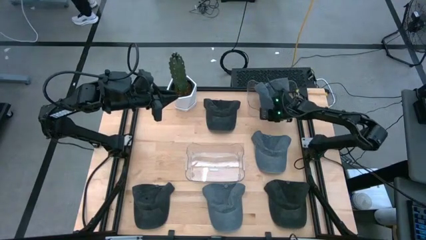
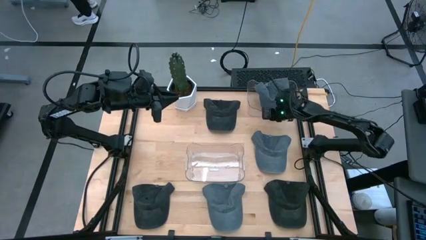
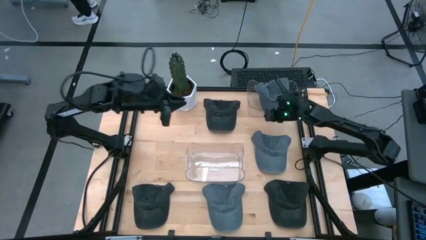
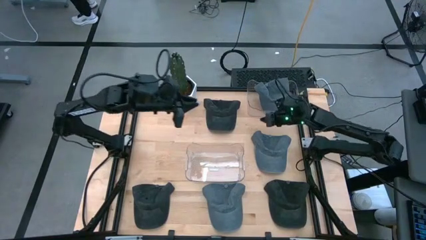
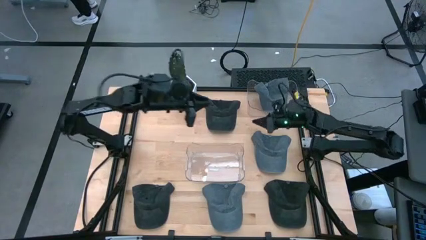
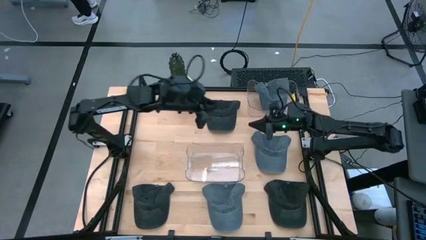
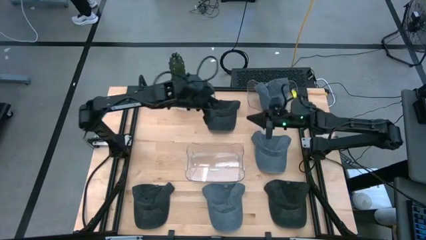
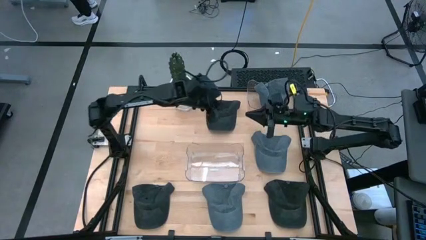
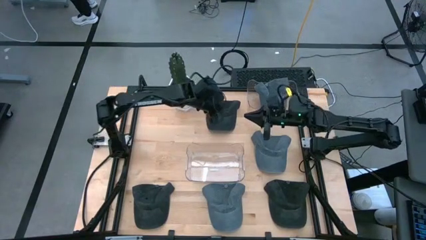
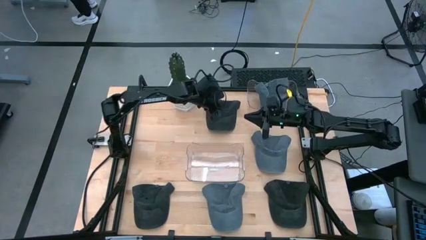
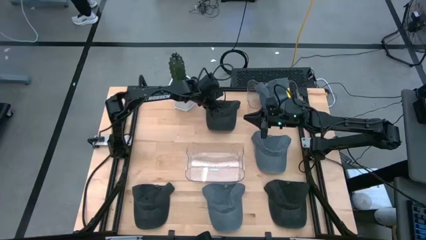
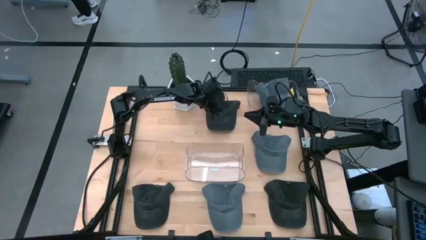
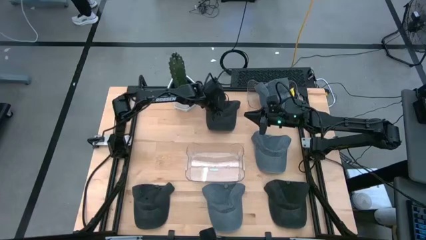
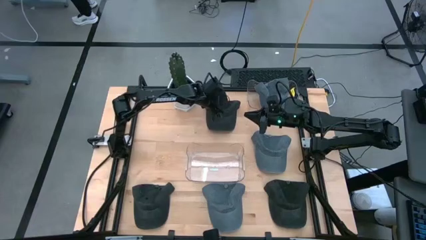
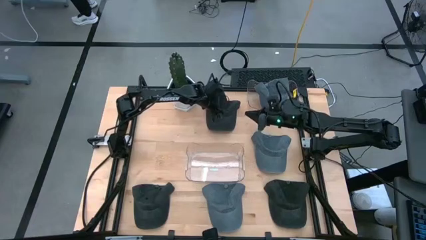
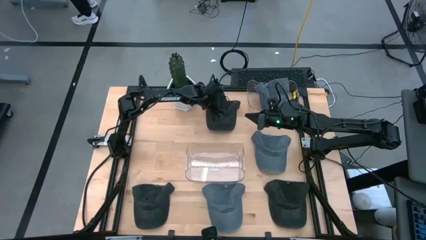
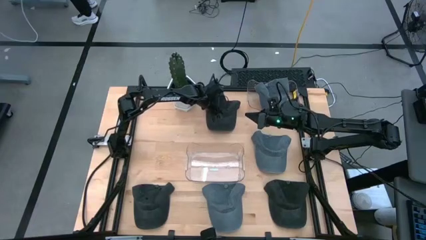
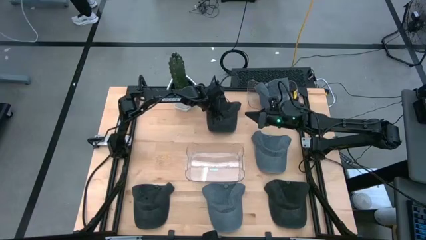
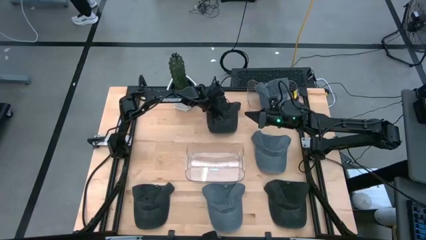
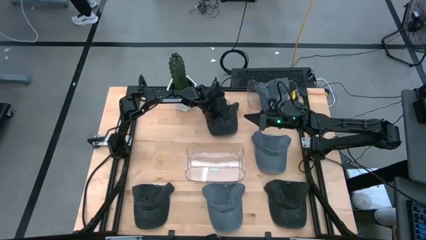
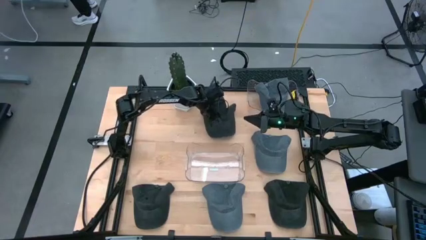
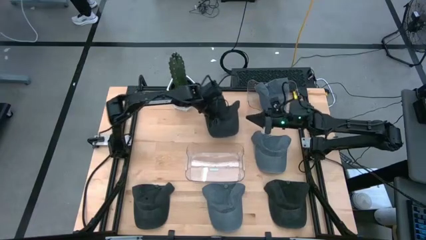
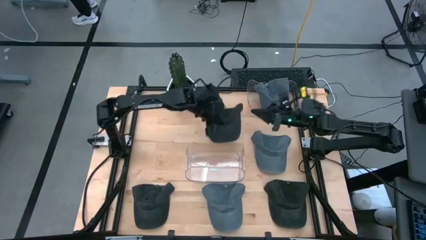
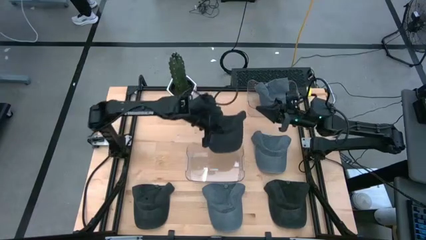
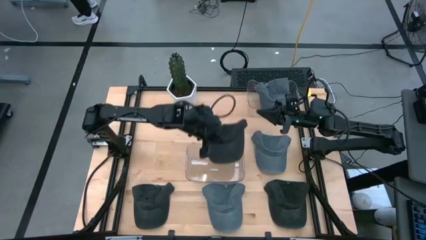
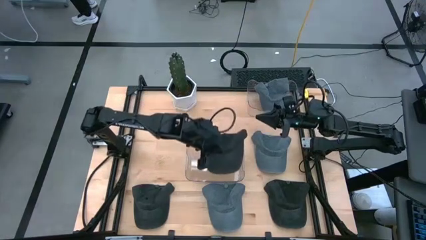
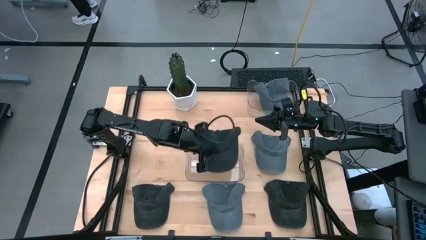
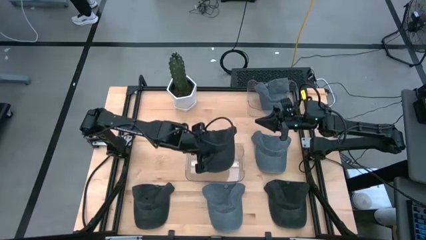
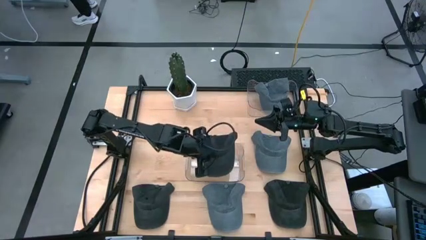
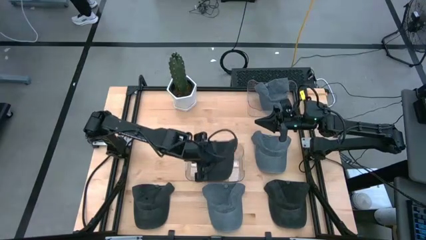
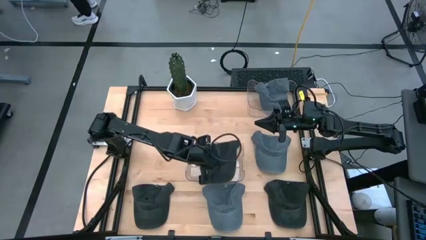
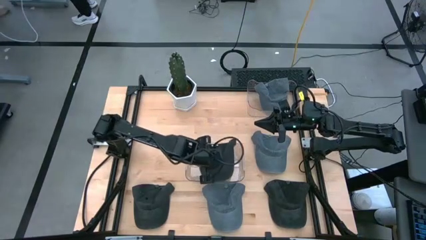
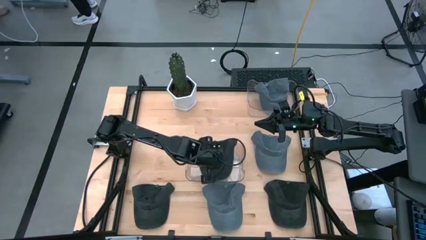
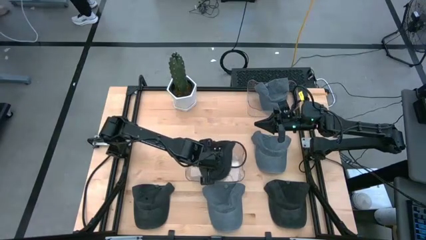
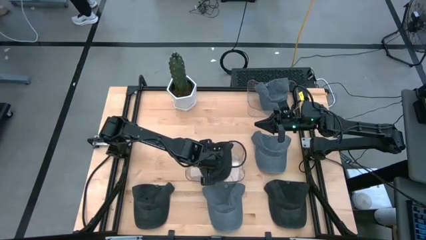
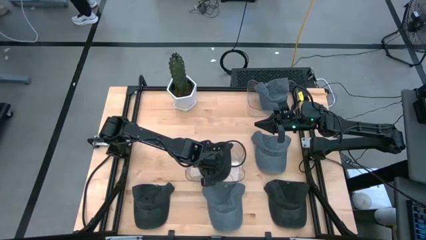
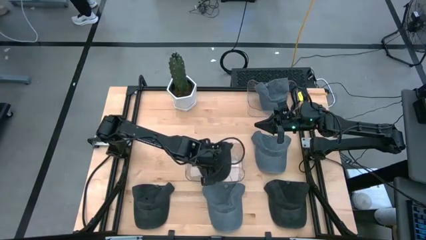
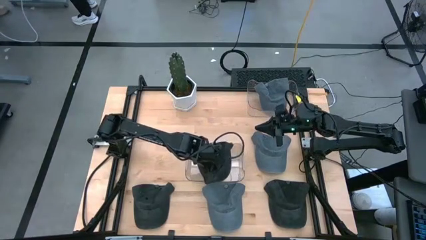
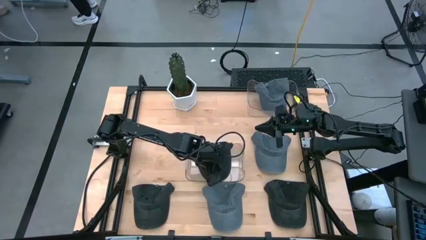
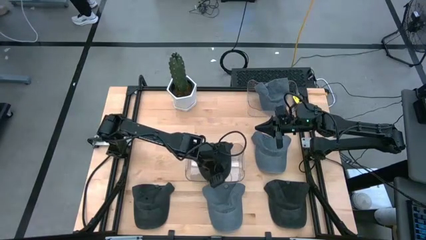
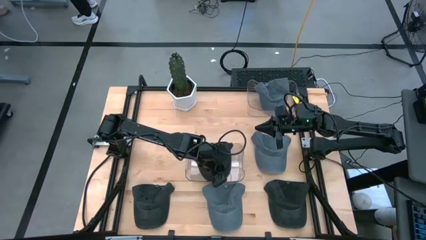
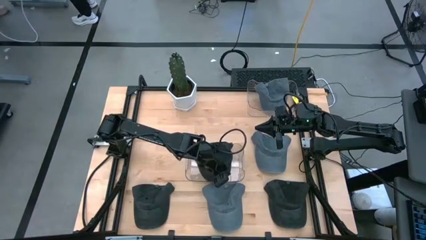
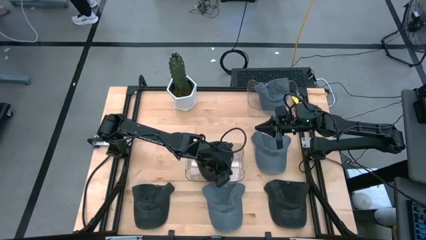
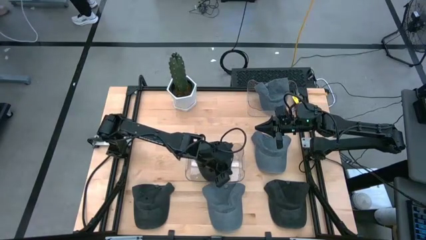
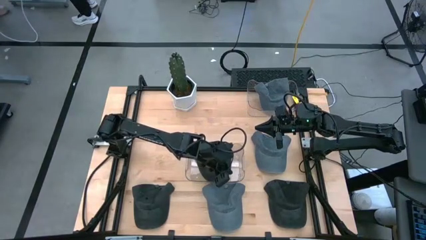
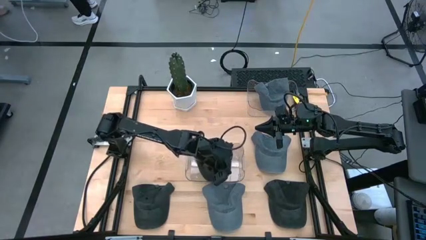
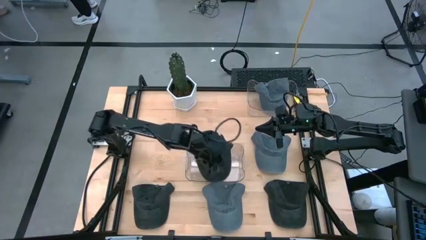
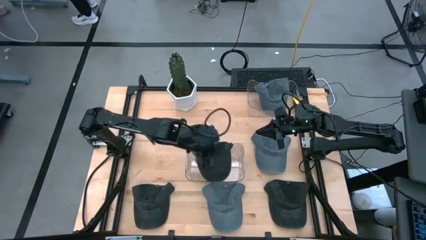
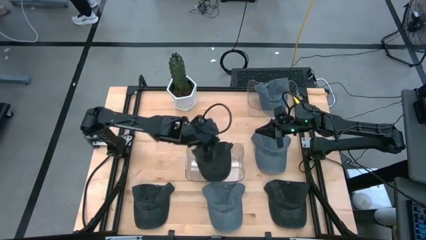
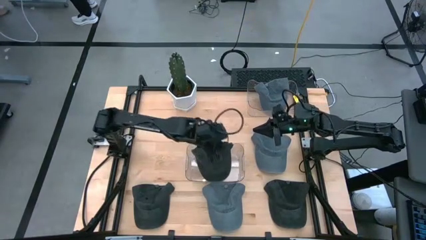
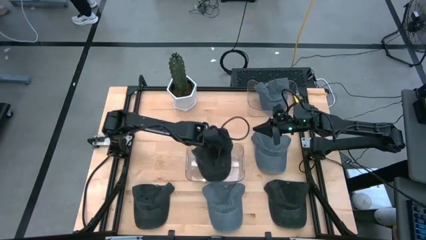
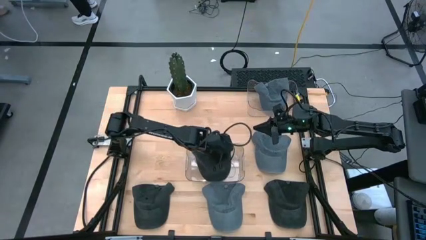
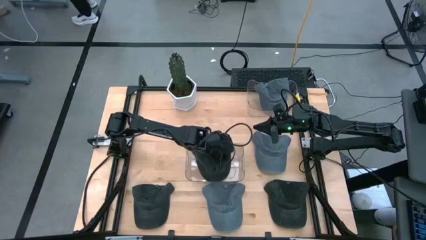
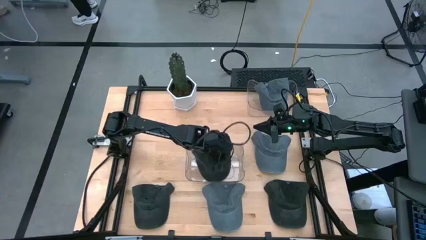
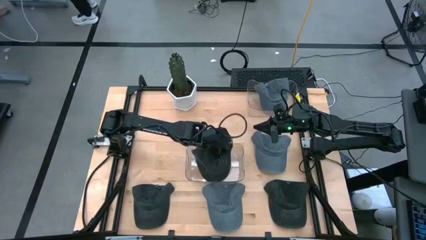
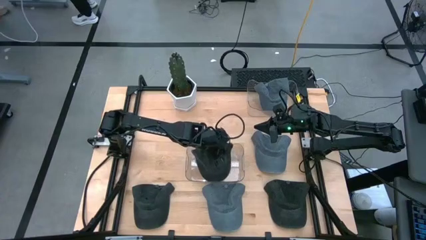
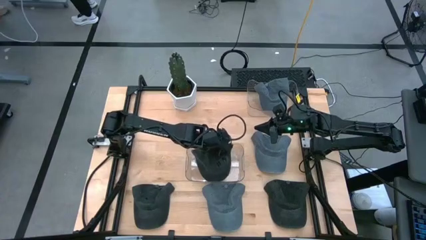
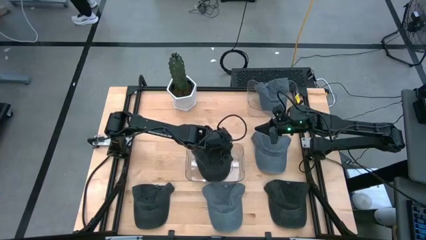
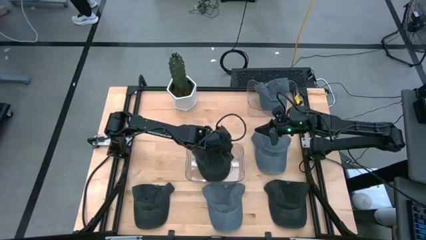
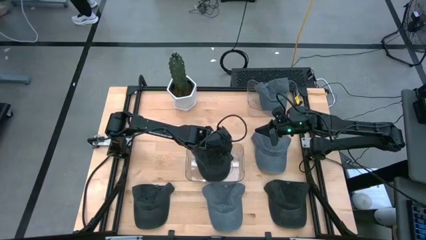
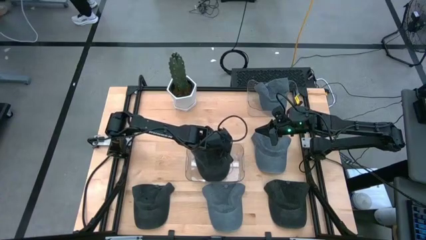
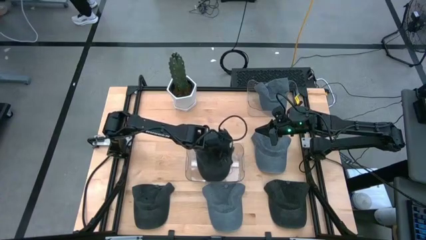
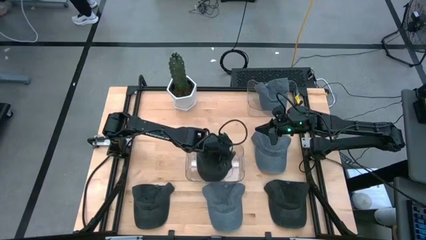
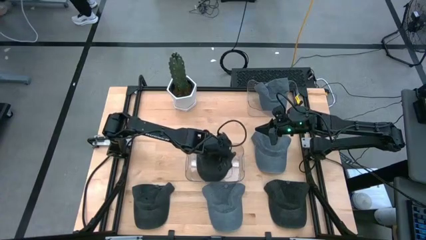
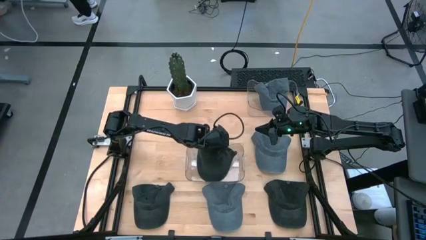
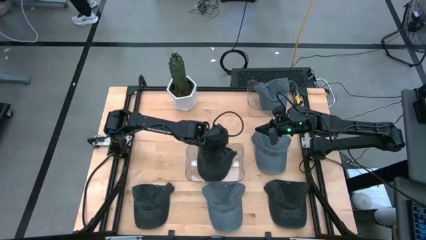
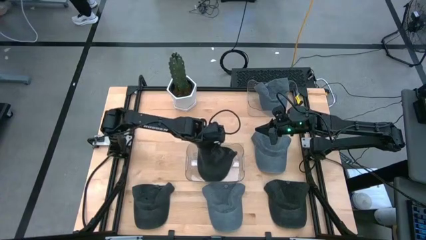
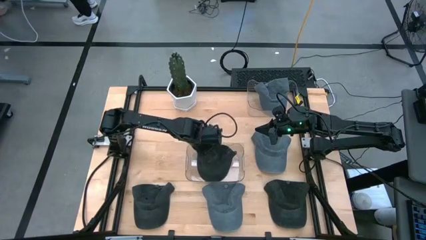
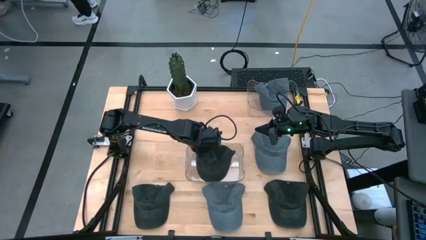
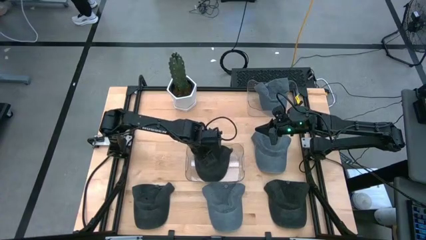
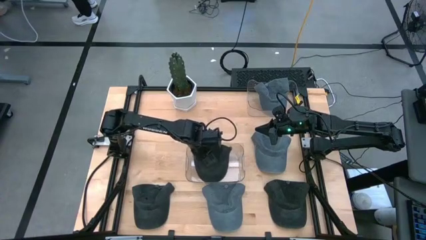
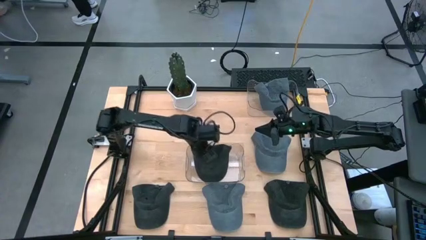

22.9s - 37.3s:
Task: Pick & Place hat
Put the top black cap into the bottom transparent bin

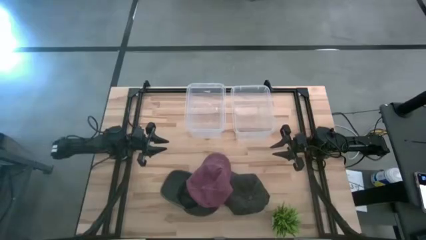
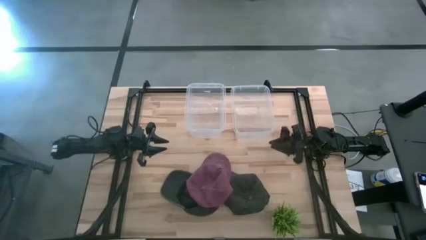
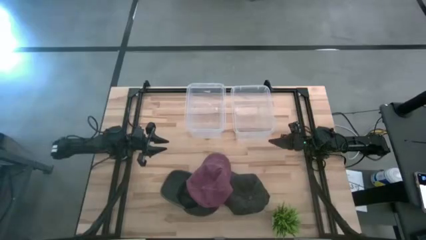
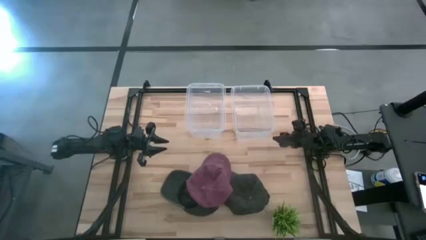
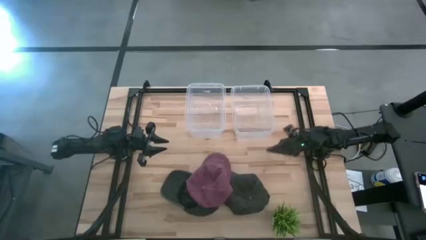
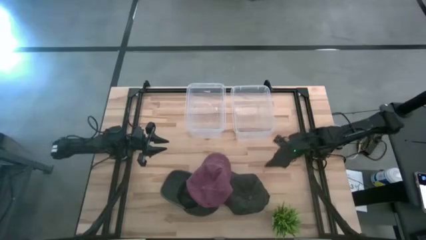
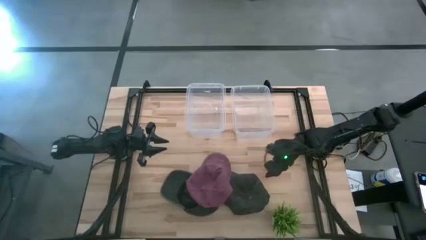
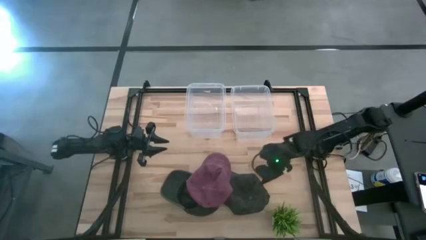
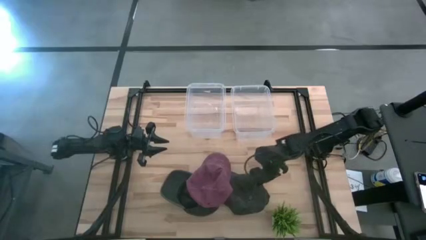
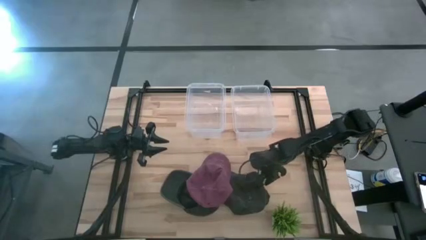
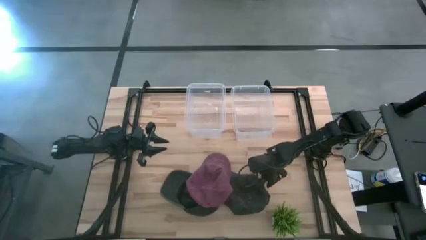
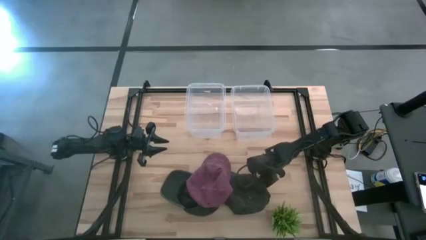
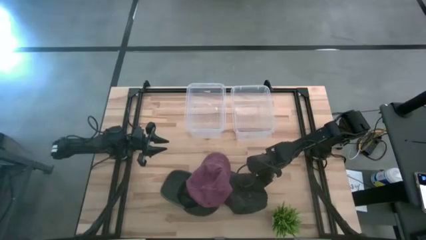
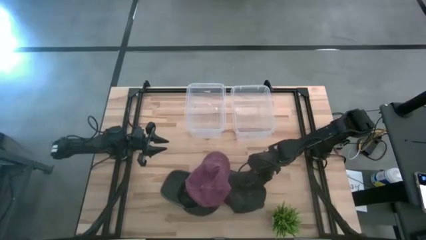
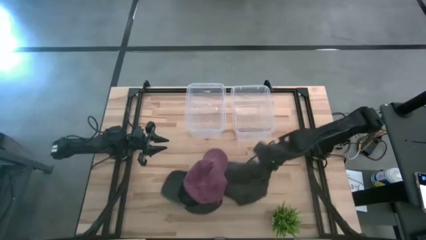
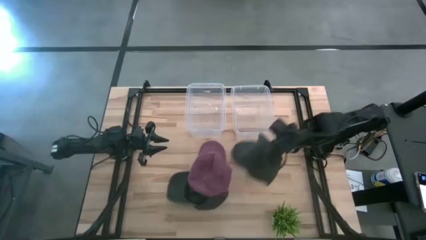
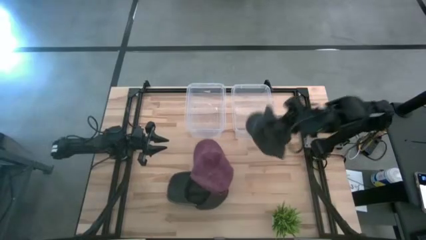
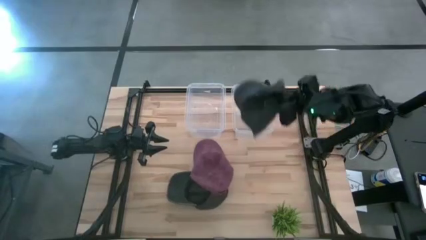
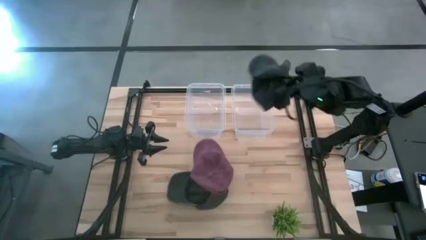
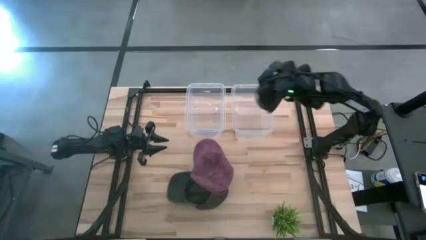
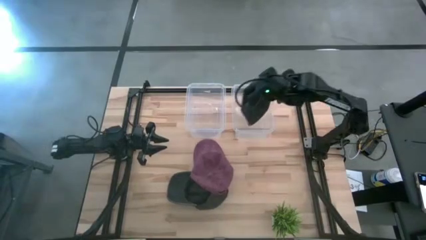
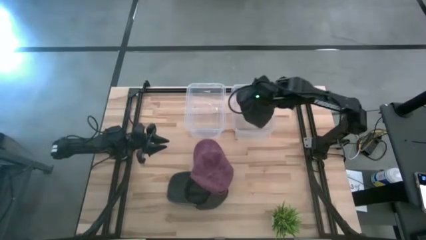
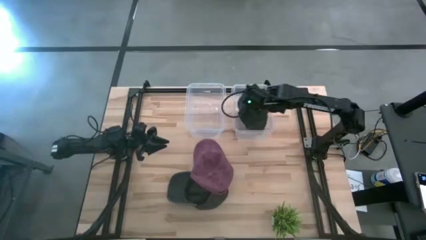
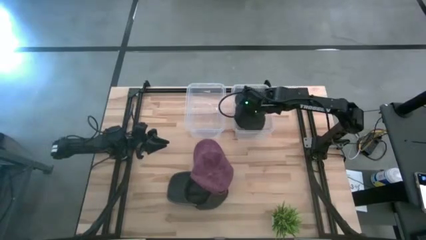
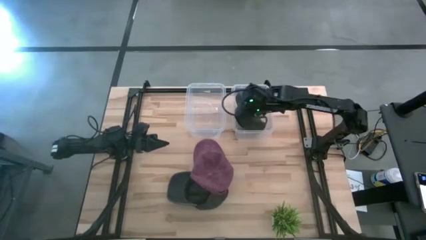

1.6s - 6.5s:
Task: Pick & Place hat
Put the right dark gray cap into the right transparent bin
